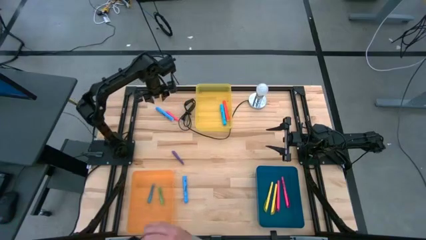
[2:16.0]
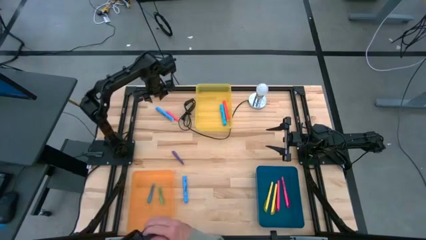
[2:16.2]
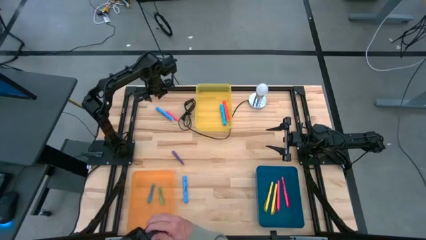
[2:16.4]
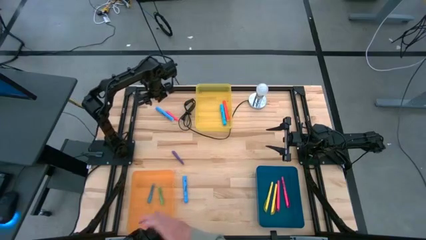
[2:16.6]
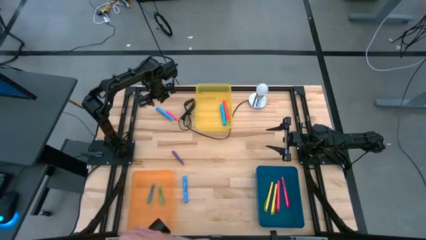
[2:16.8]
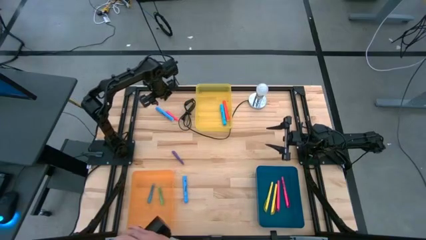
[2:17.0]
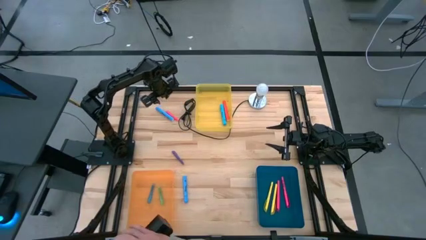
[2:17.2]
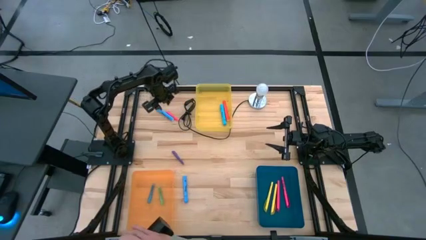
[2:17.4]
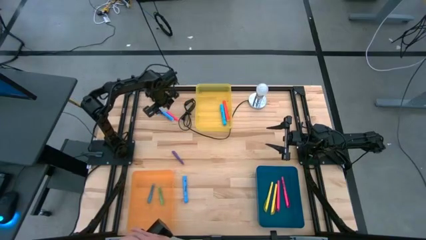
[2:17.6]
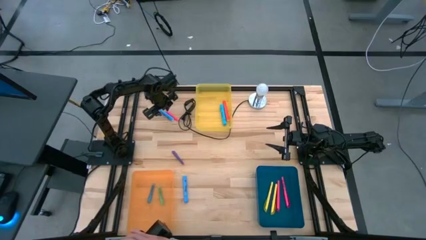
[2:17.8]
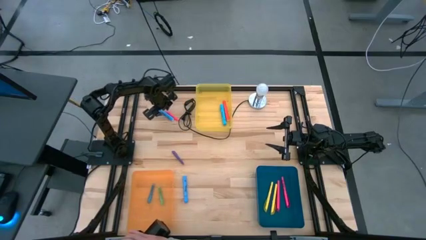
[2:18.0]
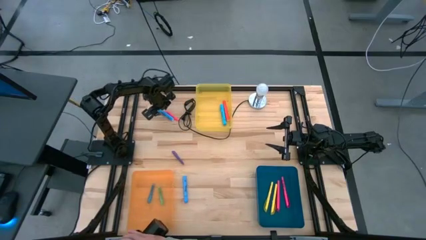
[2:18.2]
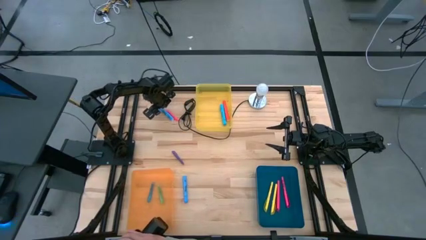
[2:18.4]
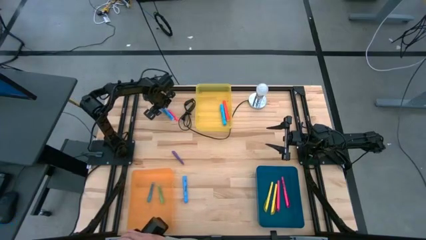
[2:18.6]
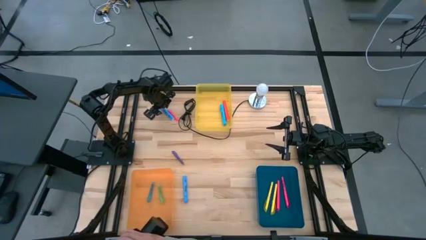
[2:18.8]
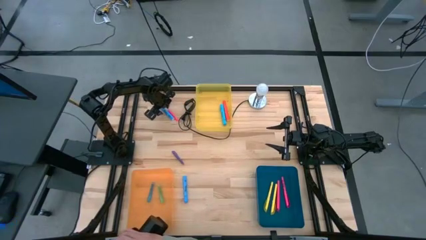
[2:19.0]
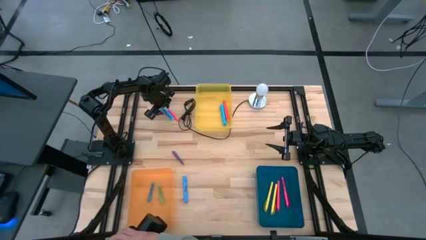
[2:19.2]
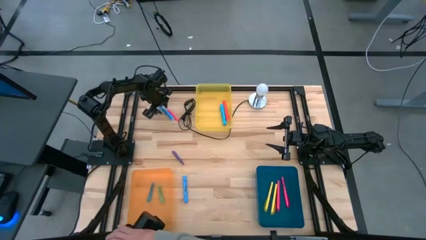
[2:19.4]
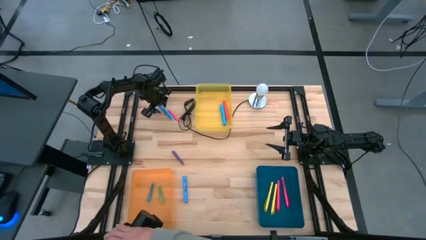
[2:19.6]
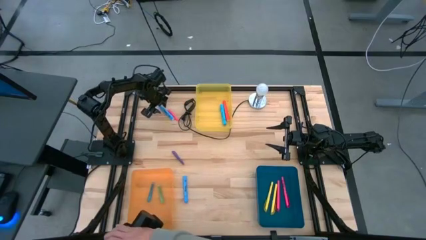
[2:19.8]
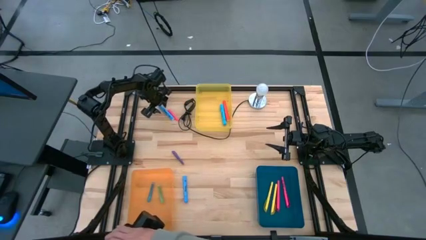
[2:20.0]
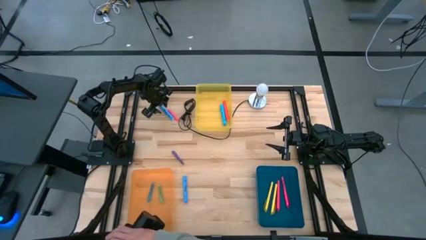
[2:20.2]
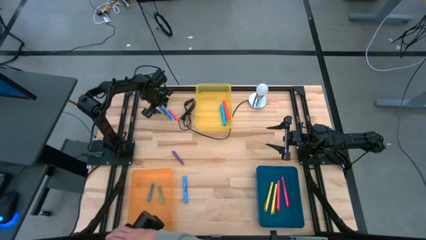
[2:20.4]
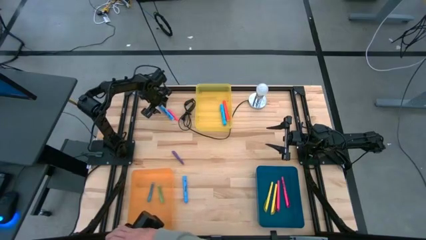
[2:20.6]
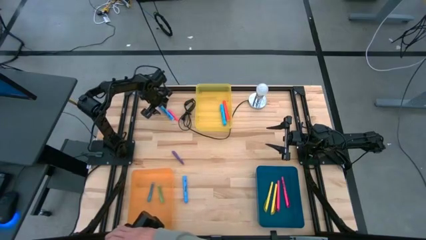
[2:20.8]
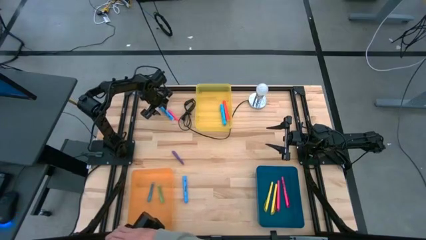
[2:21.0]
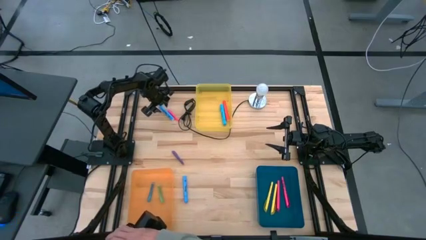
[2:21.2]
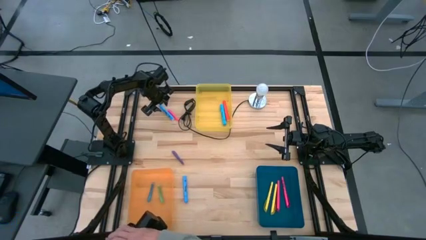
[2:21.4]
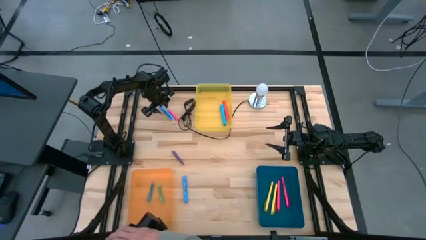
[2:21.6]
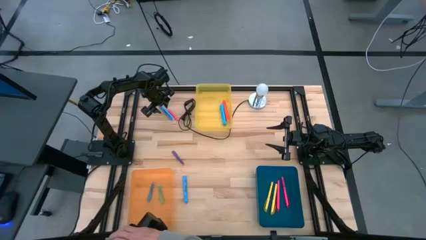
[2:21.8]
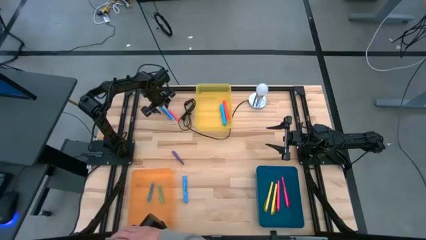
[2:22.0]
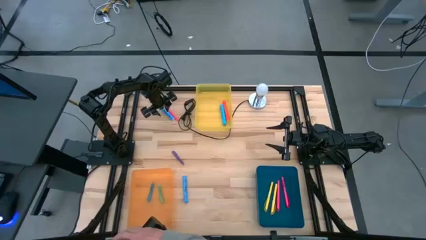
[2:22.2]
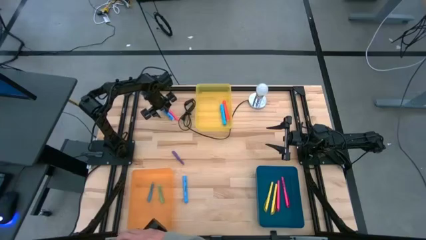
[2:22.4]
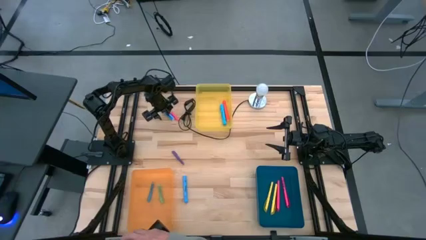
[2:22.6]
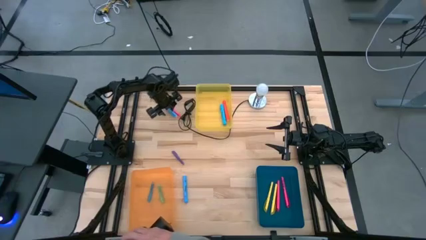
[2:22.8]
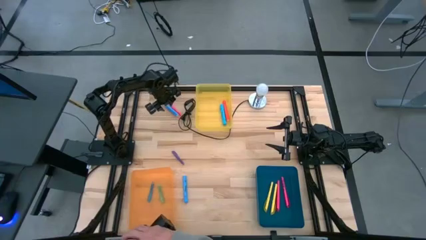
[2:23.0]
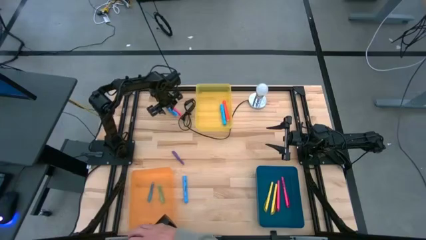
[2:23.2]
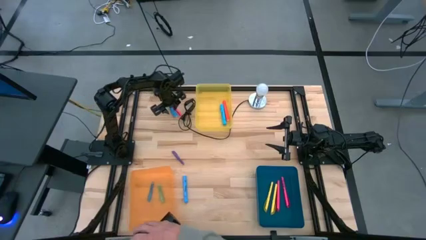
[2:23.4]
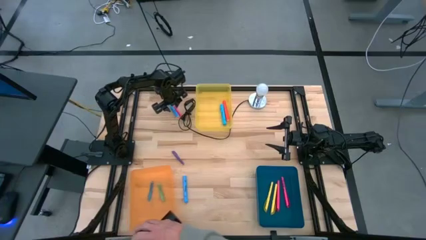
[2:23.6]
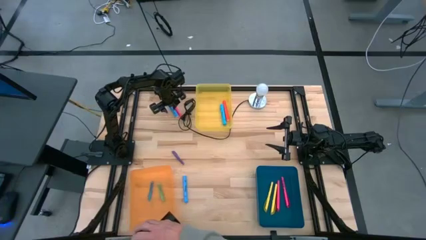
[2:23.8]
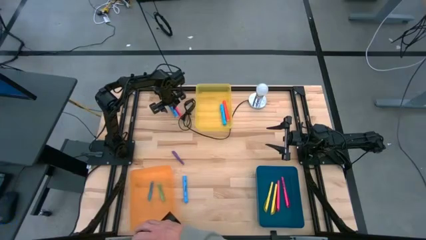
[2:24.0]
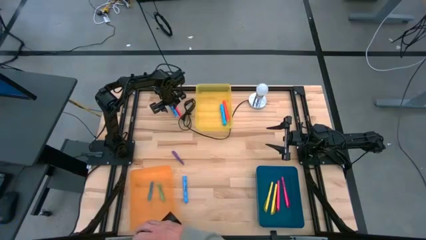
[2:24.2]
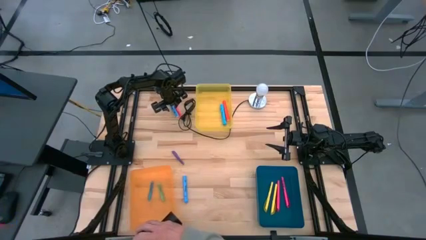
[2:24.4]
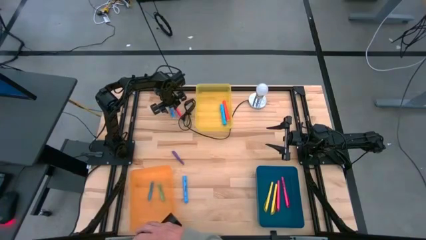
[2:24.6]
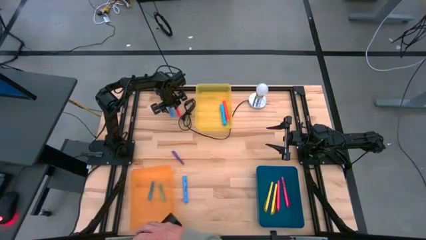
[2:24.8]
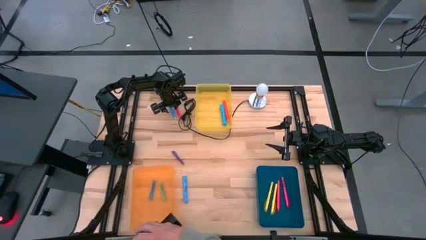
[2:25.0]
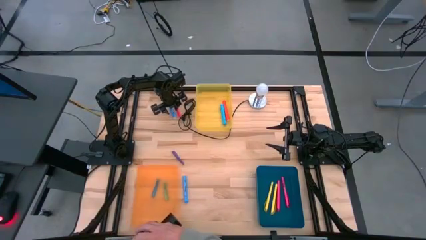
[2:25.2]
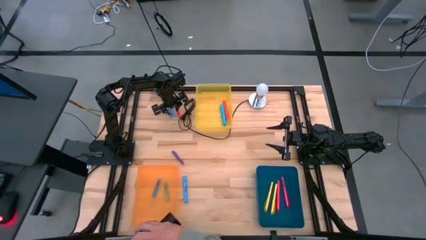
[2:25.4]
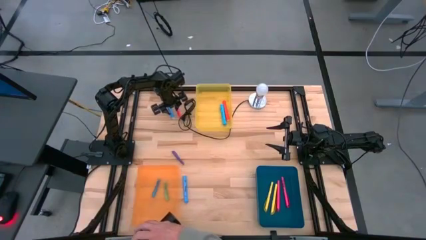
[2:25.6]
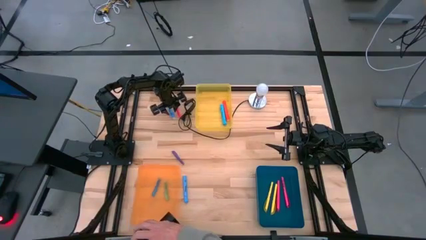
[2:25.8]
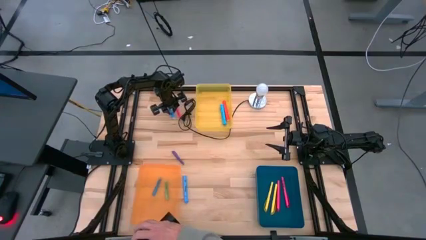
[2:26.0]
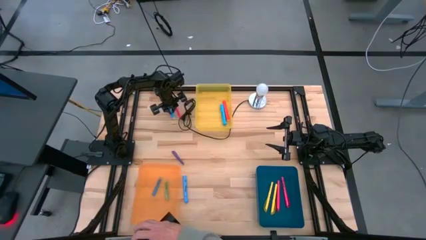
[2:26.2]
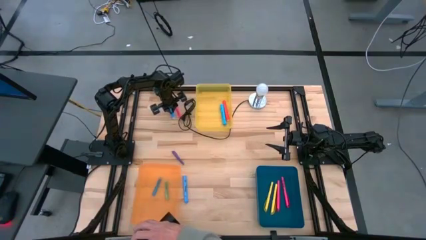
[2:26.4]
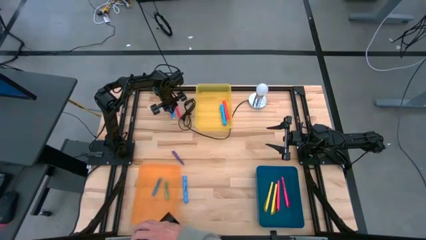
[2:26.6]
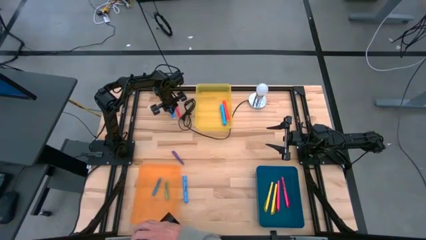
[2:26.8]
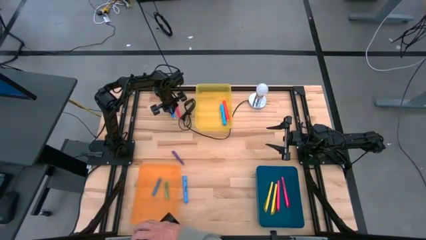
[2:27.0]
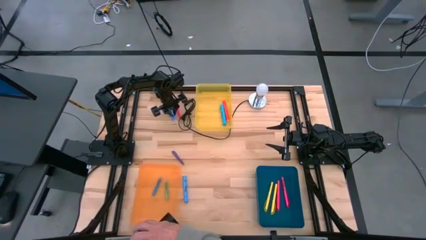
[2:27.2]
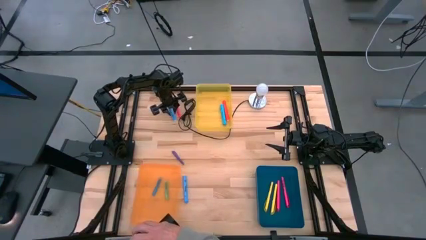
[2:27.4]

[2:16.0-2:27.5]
Task: Pick & Place Markers
Put the top blue highlighter into the yellow bin

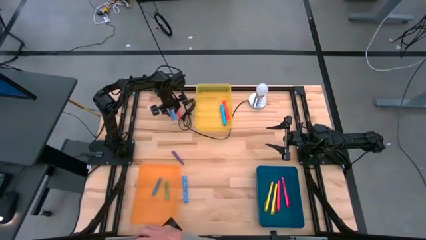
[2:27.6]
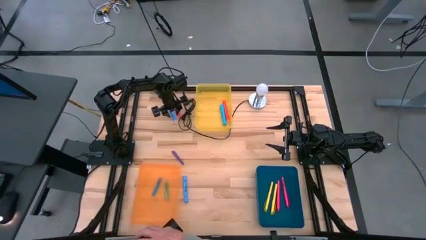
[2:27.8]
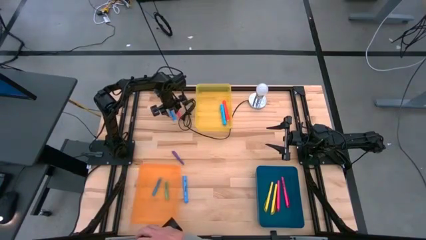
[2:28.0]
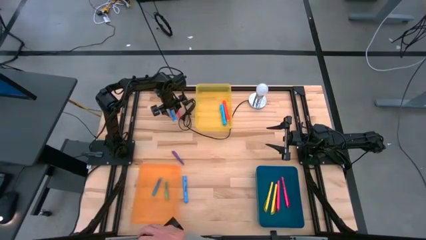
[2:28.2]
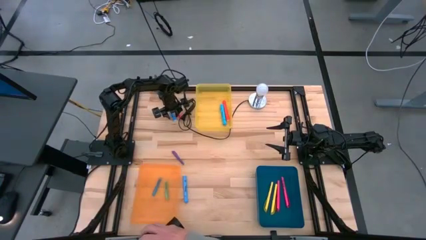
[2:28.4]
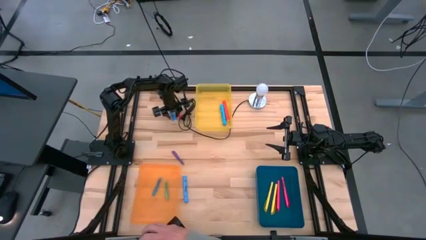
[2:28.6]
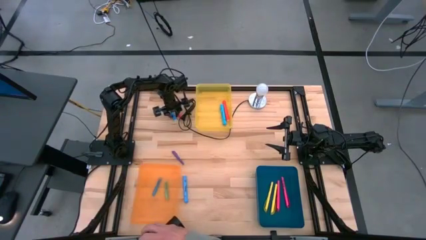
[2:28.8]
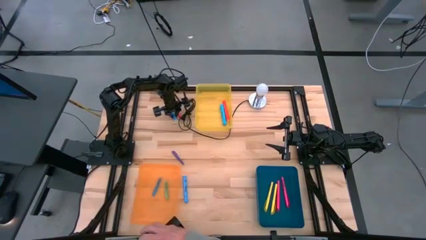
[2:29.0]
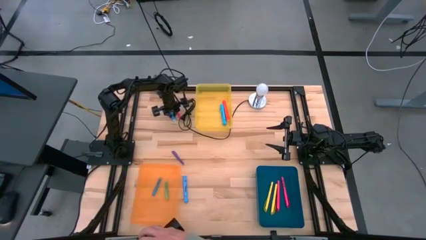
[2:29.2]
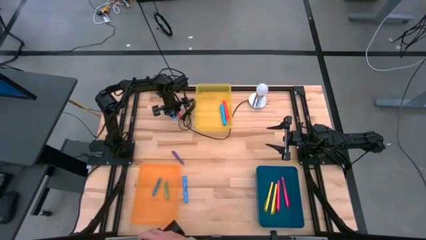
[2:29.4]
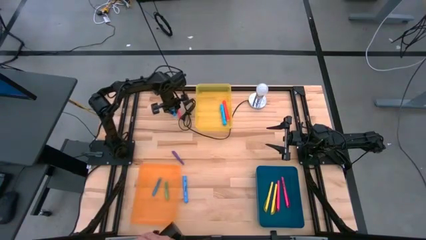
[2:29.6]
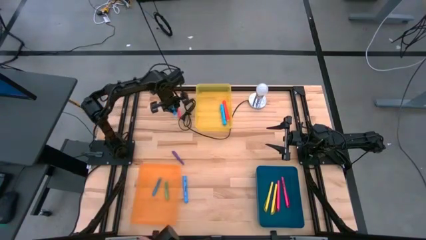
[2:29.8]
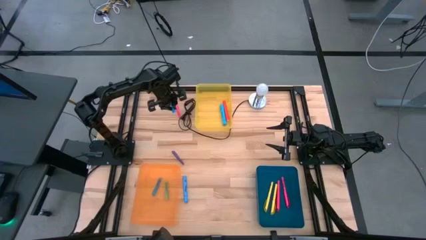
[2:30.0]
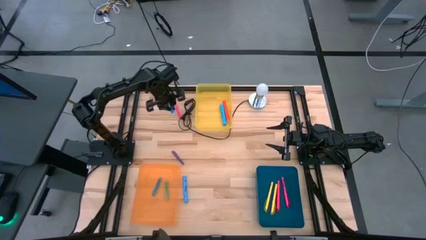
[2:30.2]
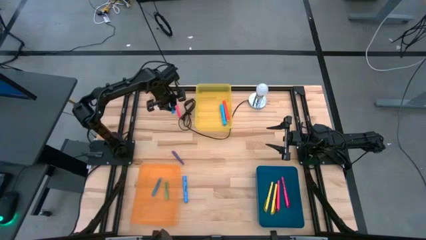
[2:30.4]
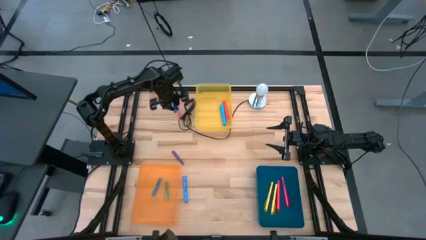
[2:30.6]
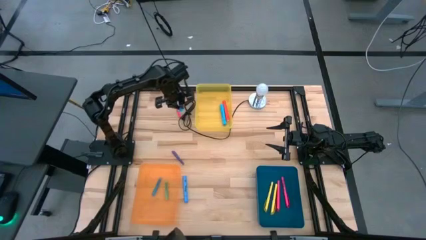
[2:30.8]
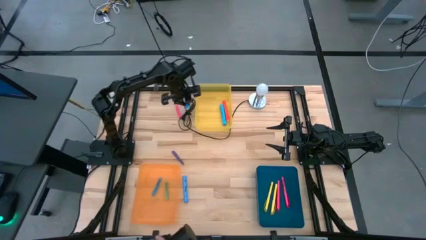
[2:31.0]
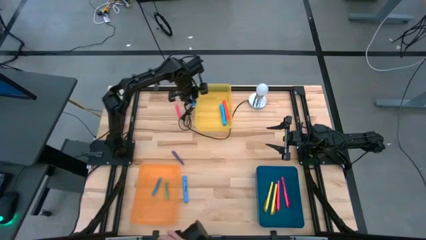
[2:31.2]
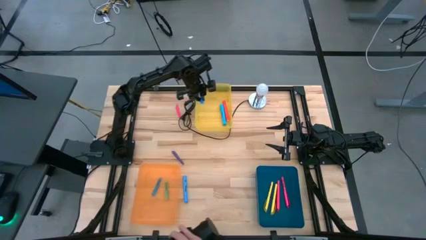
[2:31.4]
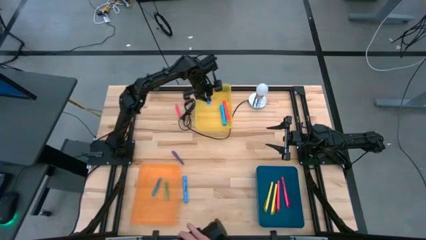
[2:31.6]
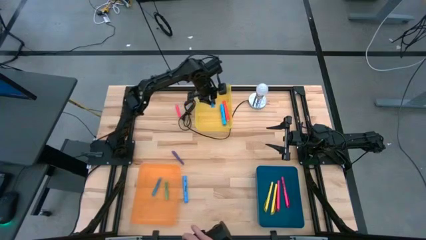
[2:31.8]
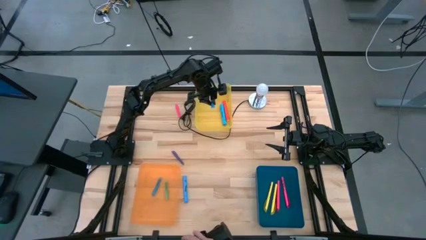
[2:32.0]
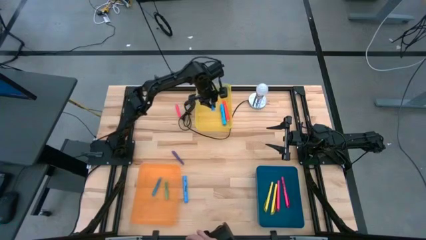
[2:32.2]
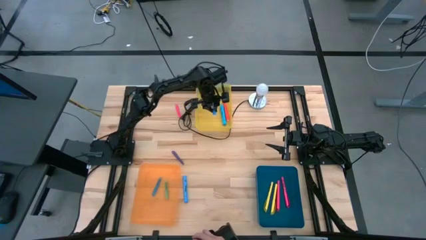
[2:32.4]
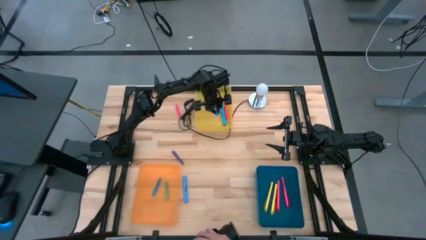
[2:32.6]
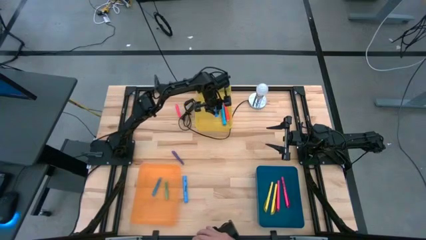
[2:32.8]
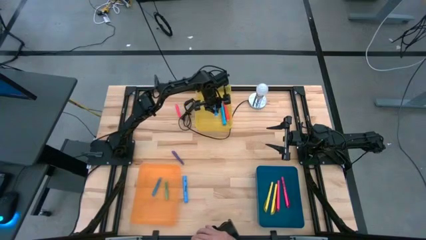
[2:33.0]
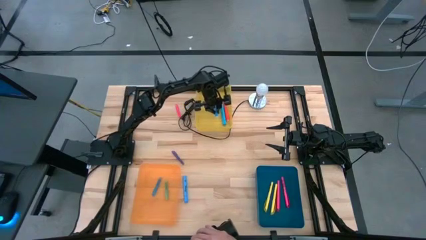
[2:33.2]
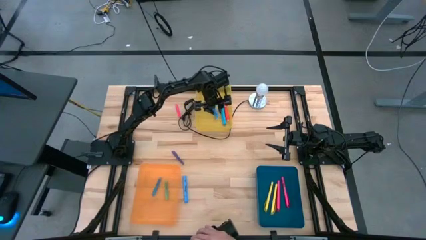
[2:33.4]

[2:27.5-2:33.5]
Put the top blue highlighter into the yellow bin
